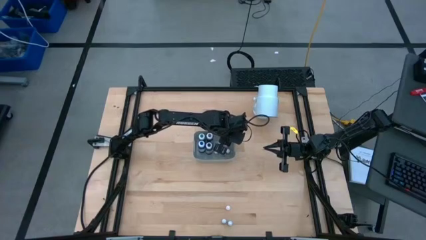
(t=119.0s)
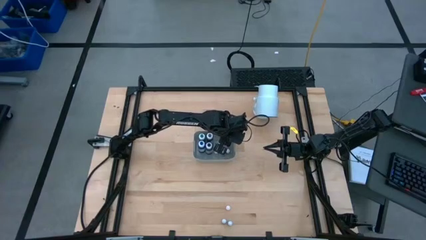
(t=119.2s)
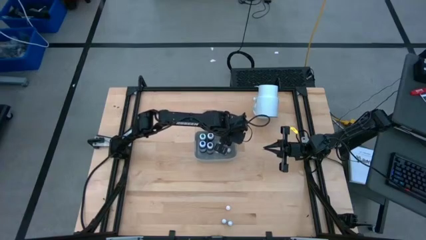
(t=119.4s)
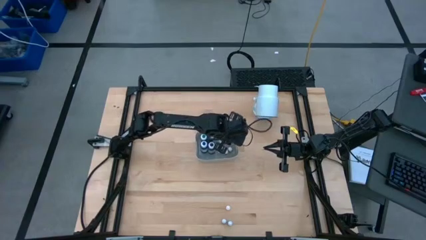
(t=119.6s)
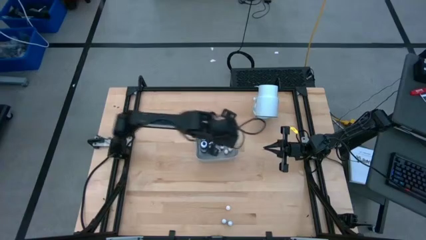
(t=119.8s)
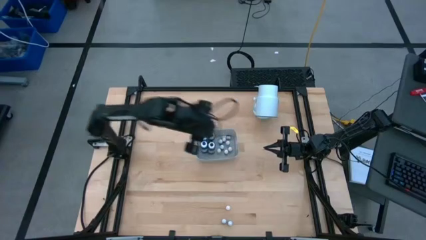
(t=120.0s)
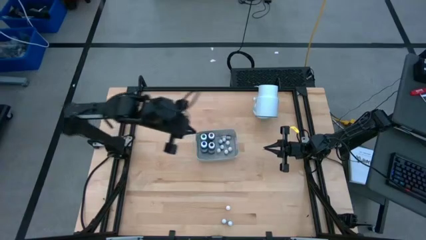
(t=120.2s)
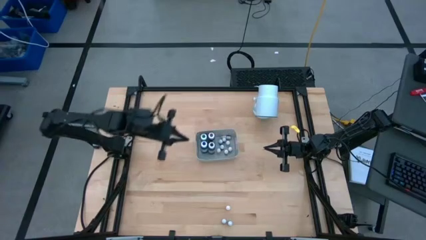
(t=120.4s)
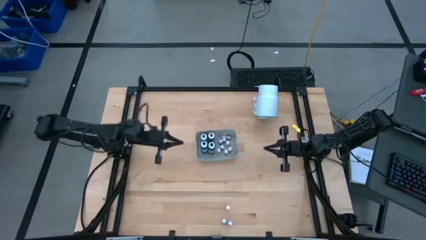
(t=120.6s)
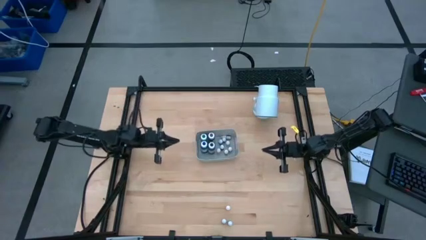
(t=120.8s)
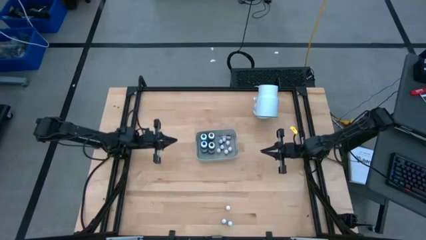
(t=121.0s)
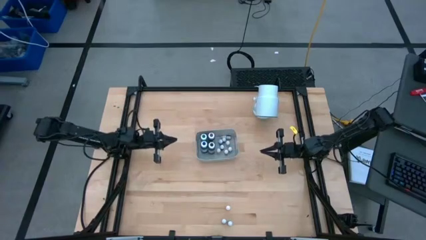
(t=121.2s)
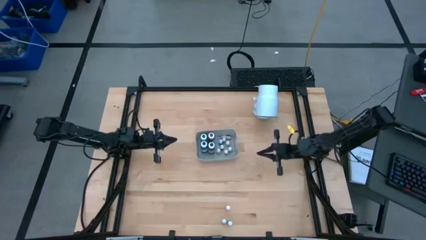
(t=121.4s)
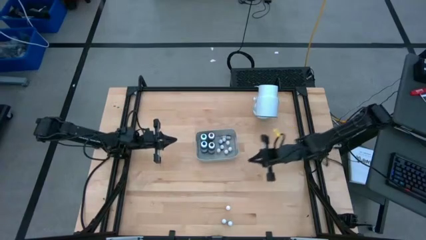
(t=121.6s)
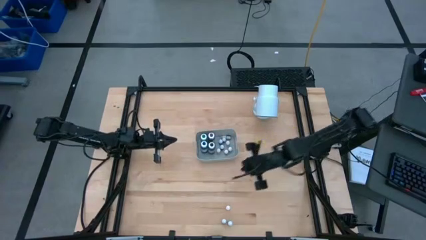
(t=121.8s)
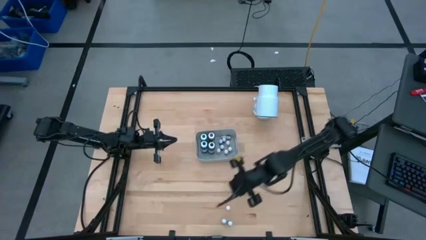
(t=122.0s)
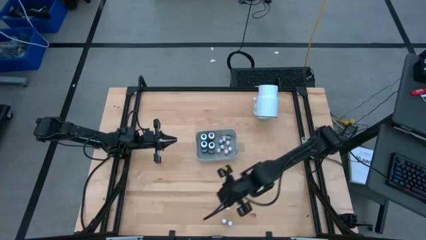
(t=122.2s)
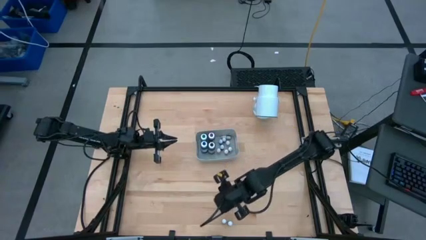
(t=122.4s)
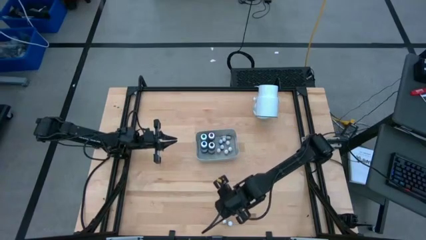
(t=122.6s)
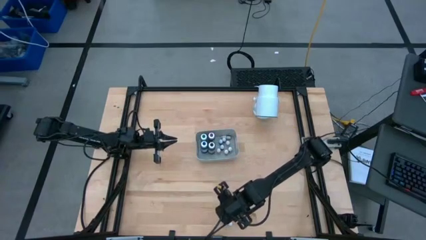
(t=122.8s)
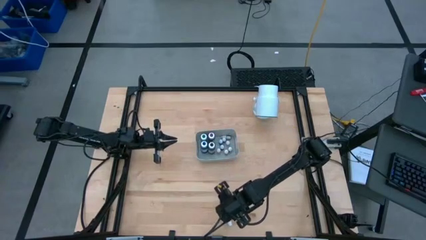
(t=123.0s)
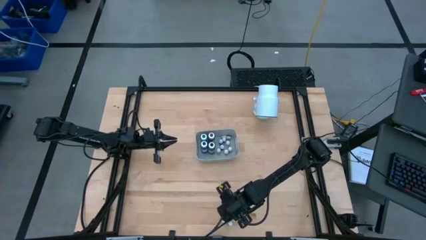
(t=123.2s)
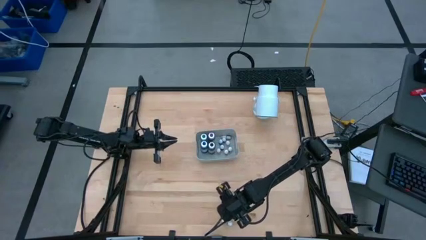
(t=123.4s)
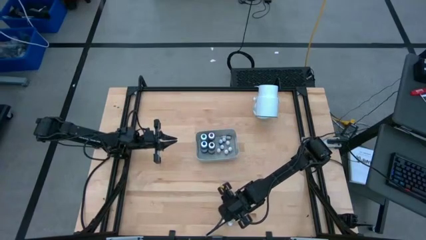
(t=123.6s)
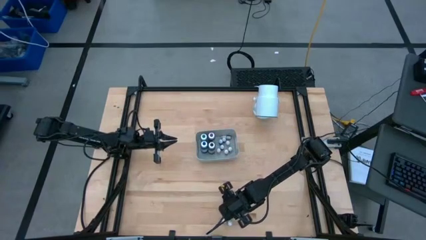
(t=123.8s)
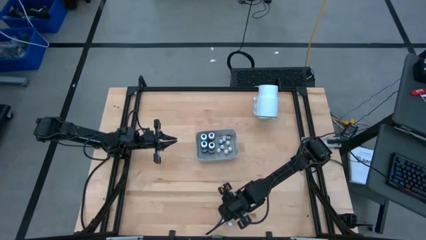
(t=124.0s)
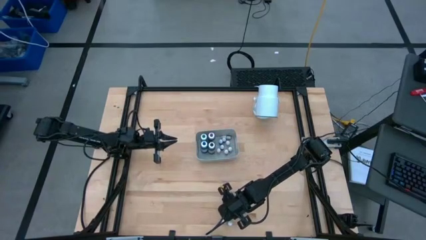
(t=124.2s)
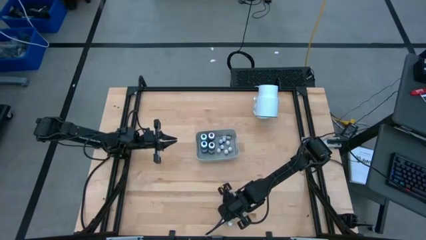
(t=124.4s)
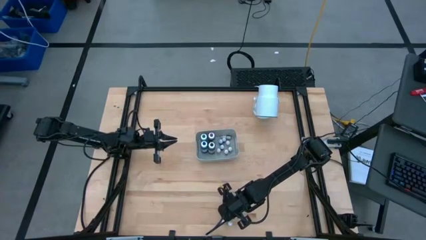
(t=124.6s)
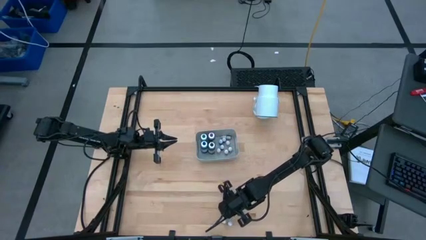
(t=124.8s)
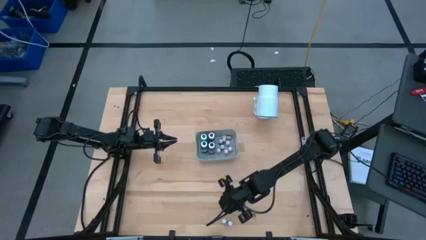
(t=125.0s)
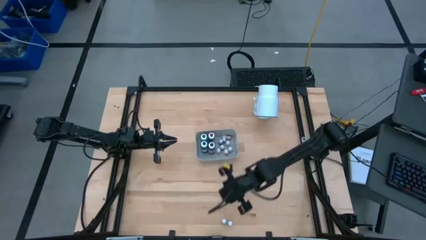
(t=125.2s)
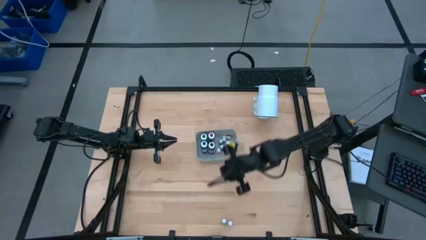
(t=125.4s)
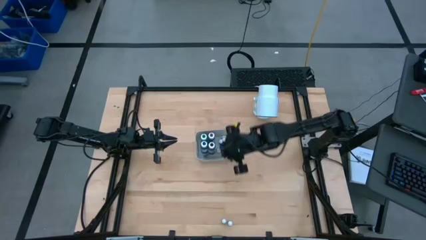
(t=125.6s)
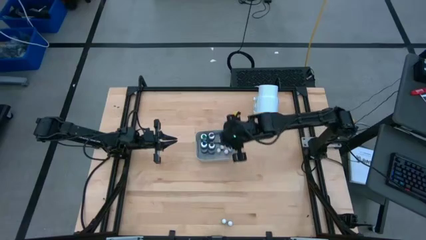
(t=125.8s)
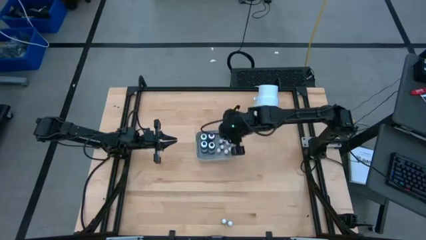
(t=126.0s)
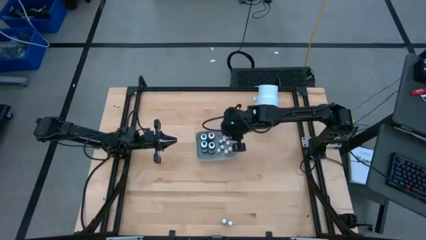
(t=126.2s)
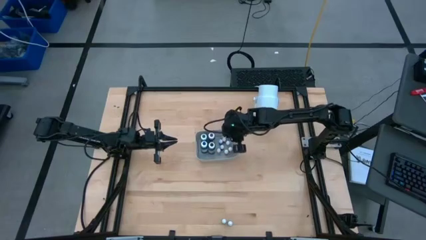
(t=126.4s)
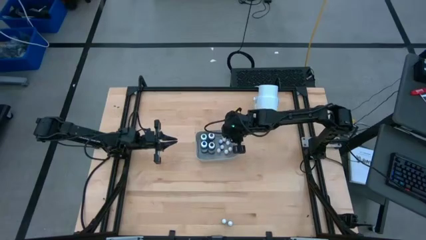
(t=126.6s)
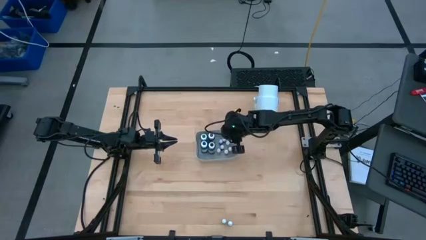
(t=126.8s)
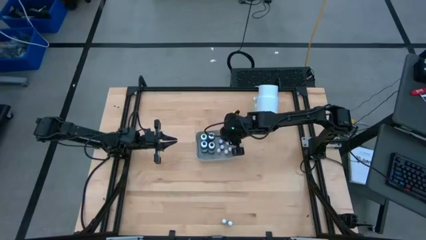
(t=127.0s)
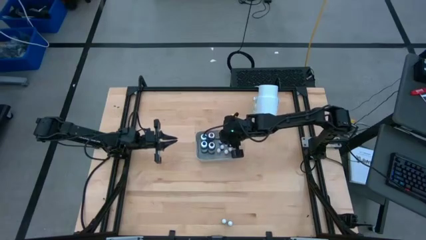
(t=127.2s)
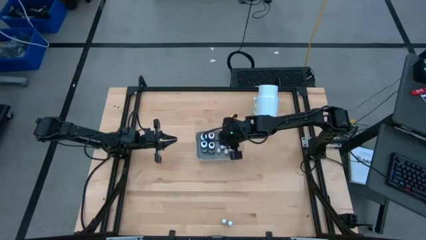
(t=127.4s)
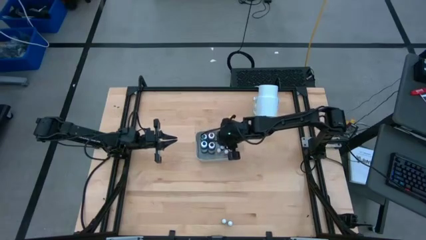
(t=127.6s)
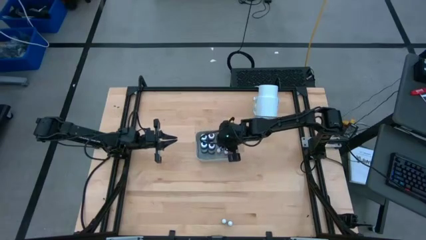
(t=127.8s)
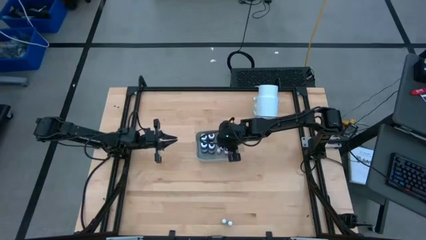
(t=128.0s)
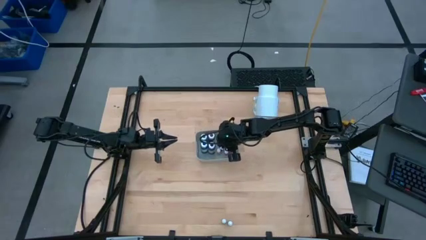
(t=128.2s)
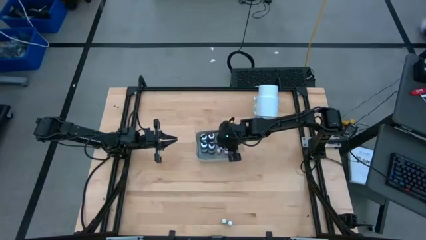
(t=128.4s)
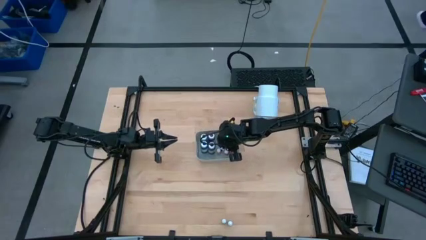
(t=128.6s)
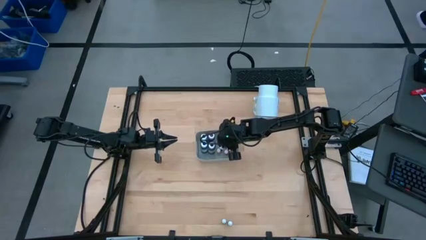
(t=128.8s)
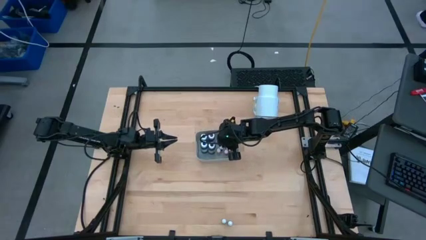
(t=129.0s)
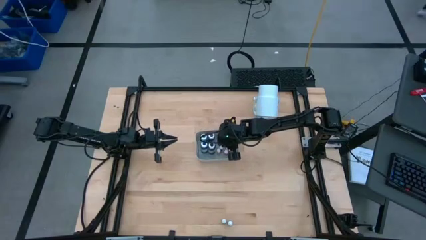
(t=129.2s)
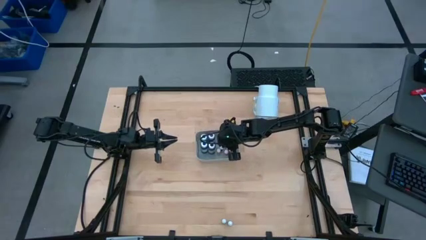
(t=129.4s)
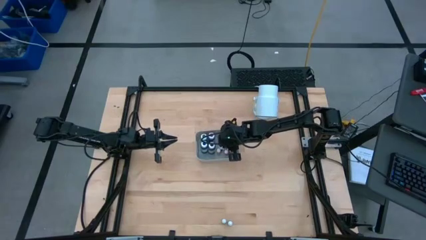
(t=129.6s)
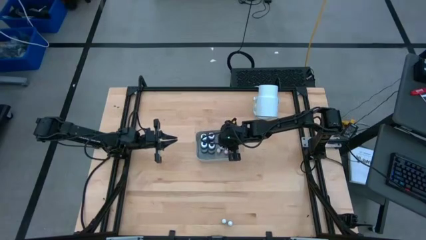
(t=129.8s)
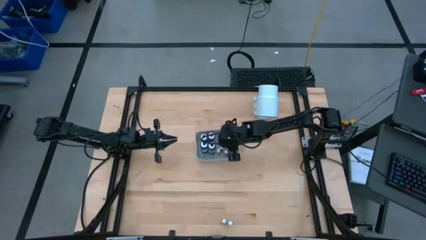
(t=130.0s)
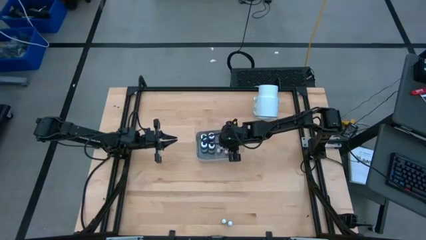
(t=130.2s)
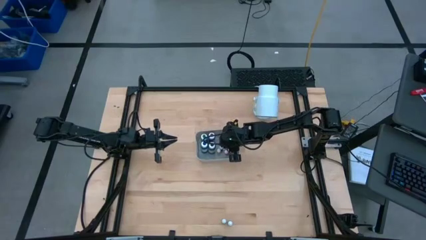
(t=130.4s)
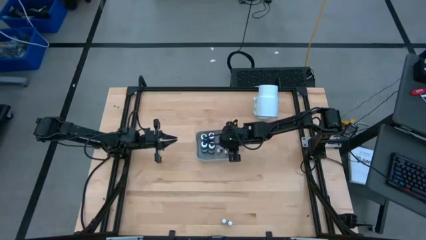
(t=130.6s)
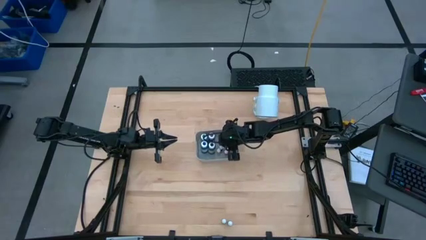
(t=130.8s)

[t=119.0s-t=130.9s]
Task: Pick & Place food coloring
Put the small yellow food coloring bottle into the gray bin

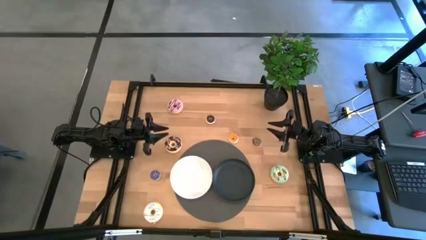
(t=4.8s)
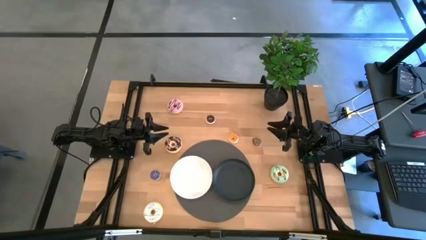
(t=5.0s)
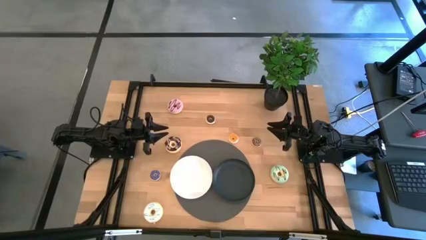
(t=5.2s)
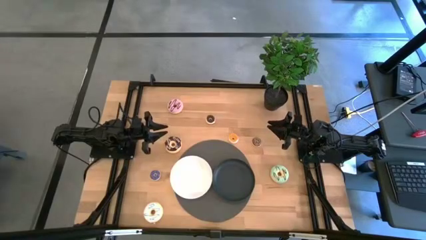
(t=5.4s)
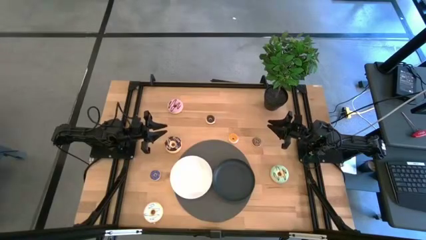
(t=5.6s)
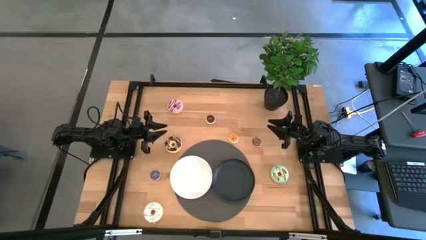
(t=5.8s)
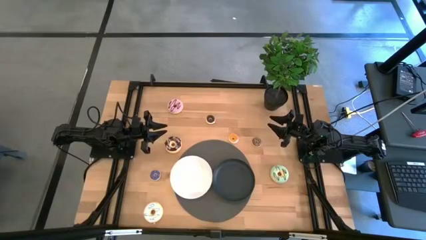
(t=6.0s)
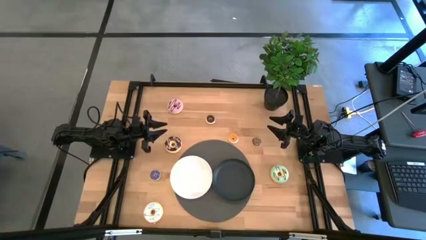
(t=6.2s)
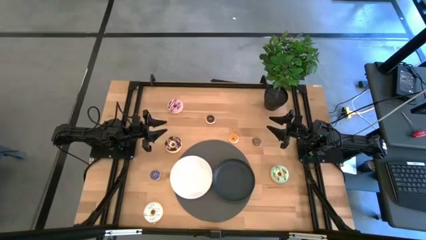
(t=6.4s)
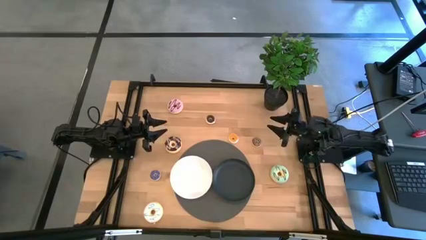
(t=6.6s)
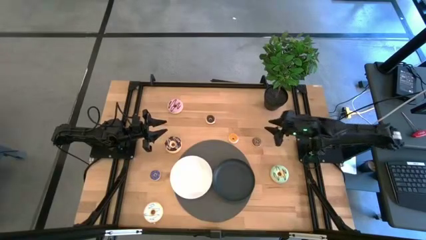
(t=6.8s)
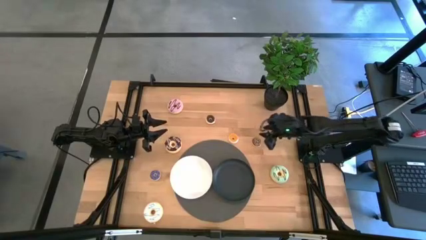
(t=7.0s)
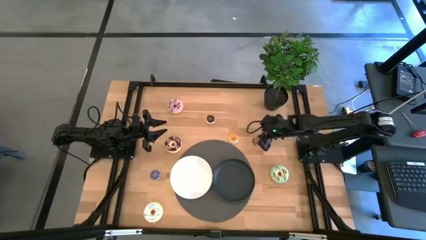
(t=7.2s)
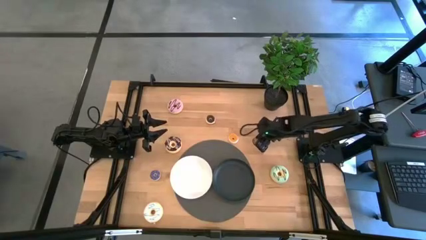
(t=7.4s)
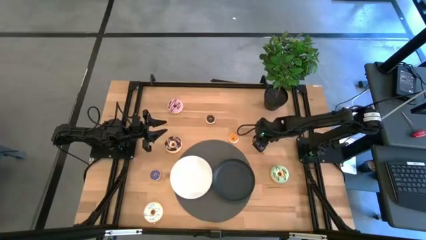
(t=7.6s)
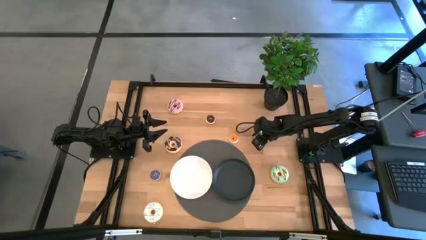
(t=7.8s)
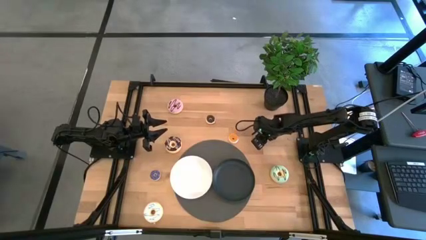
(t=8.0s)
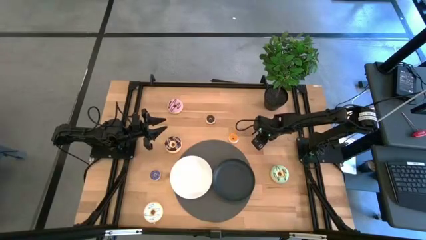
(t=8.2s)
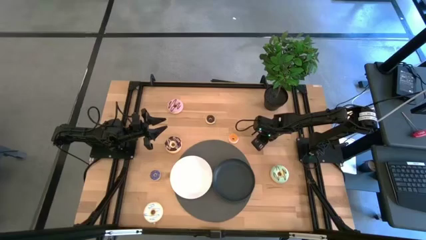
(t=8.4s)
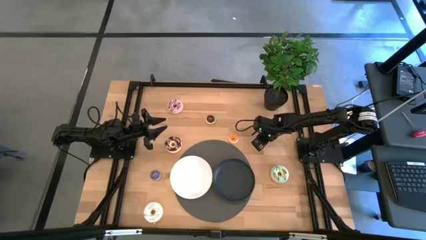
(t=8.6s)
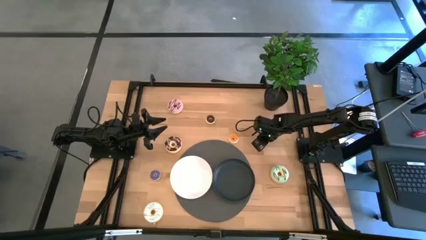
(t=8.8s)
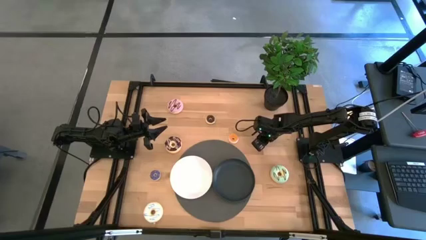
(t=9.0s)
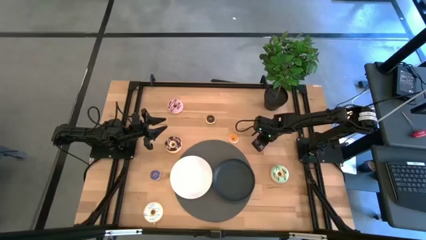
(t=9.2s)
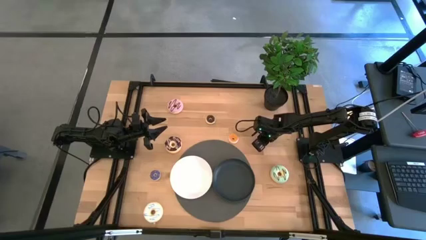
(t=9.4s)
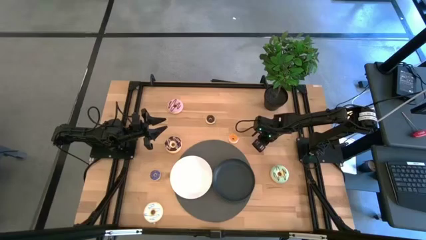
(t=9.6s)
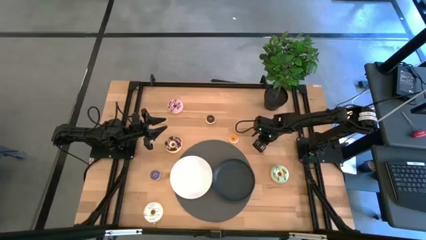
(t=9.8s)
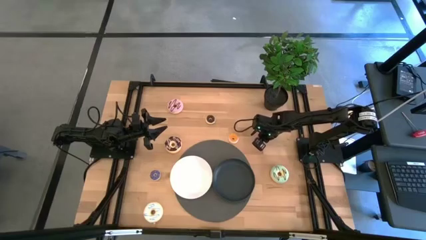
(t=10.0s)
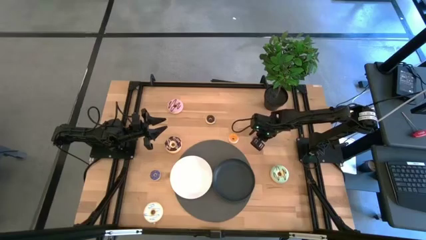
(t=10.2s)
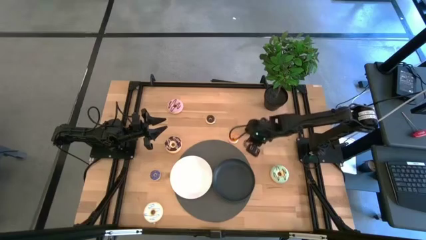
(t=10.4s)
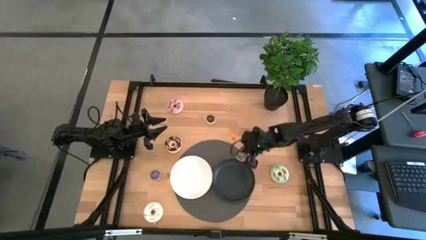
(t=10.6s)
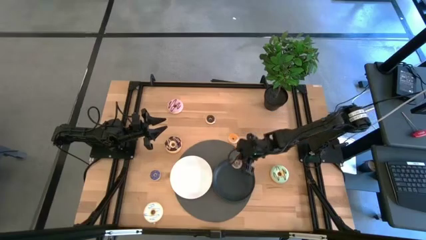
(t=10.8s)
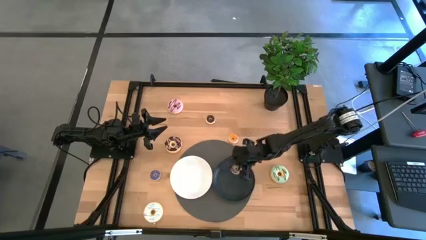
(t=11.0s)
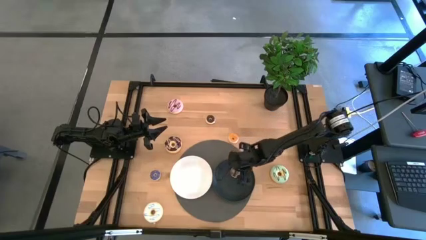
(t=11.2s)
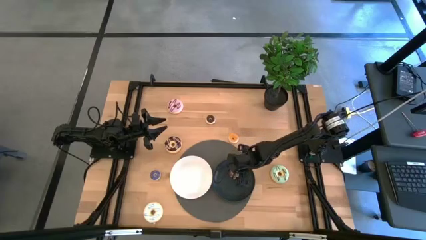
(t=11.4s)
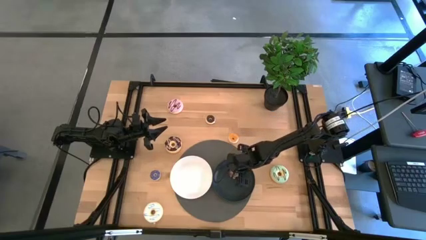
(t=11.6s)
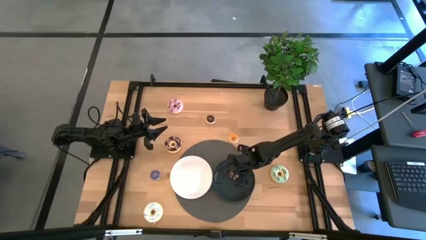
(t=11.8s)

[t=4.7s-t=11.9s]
Task: Pick & Place donuts
Put the small brown donut on the black plate
